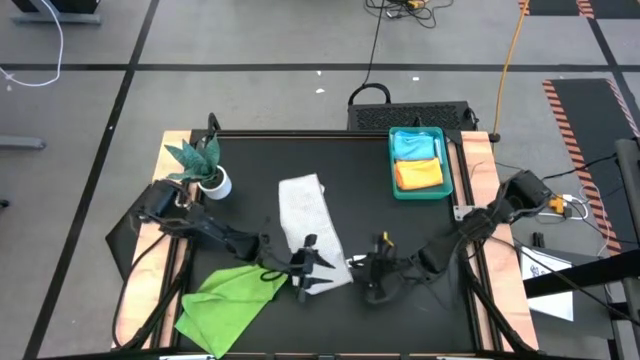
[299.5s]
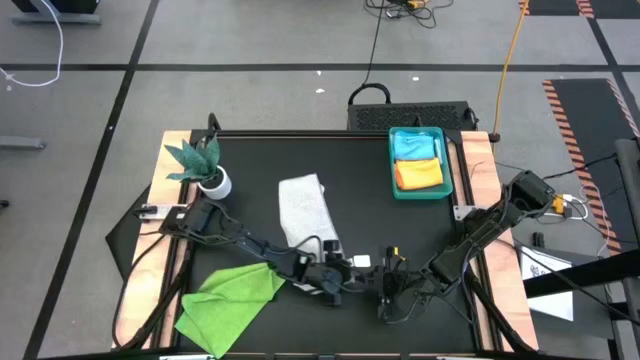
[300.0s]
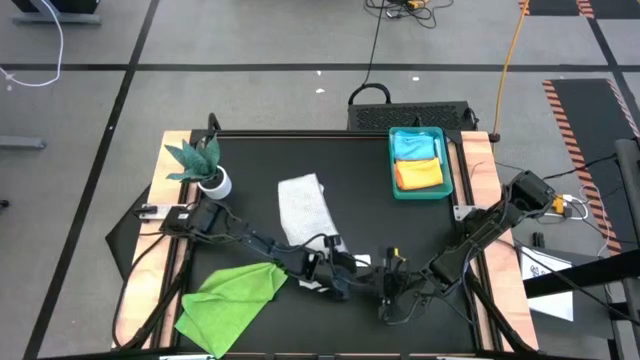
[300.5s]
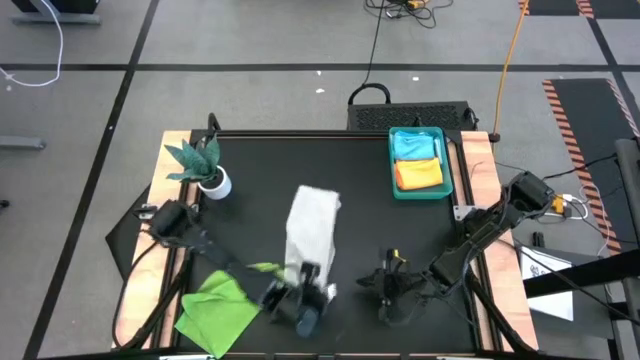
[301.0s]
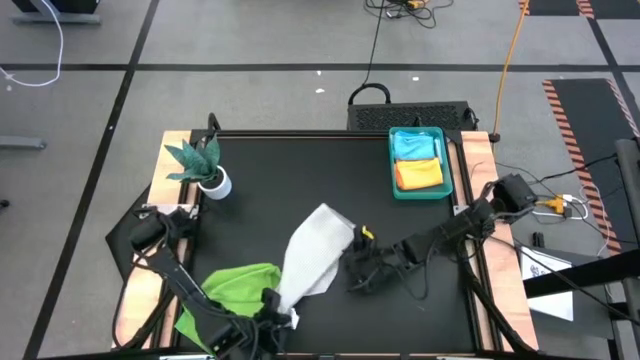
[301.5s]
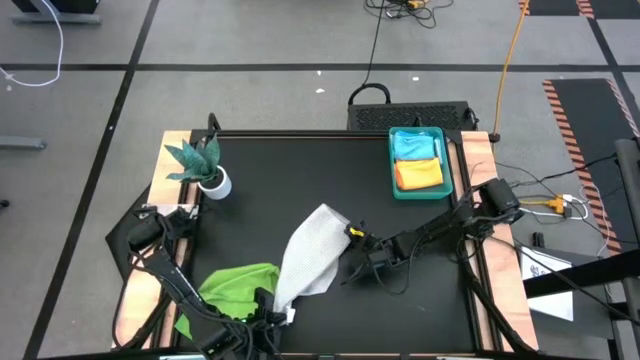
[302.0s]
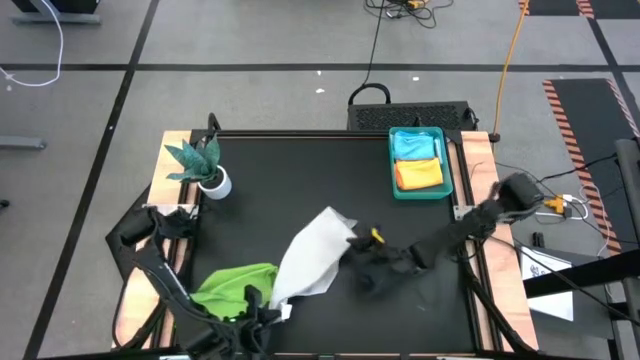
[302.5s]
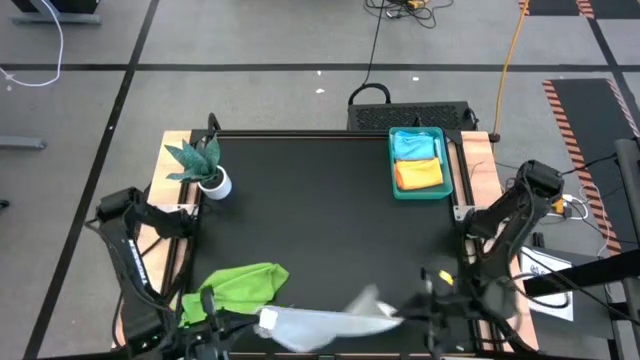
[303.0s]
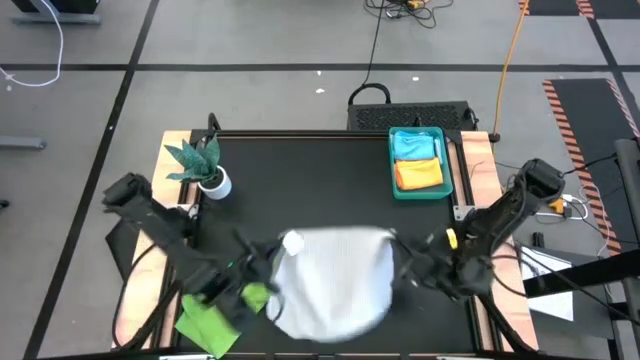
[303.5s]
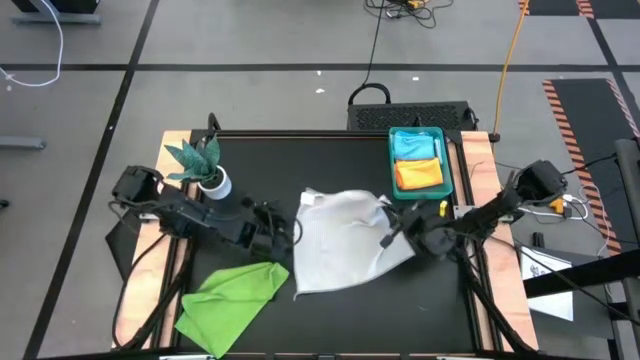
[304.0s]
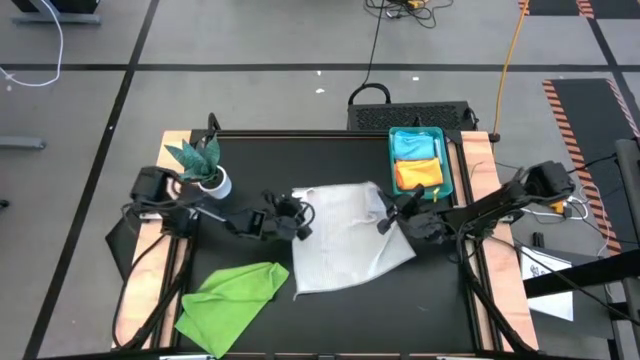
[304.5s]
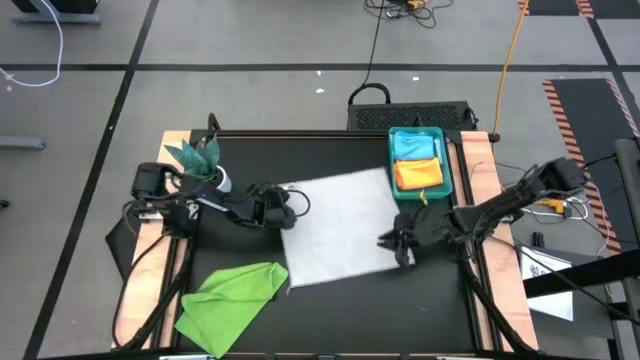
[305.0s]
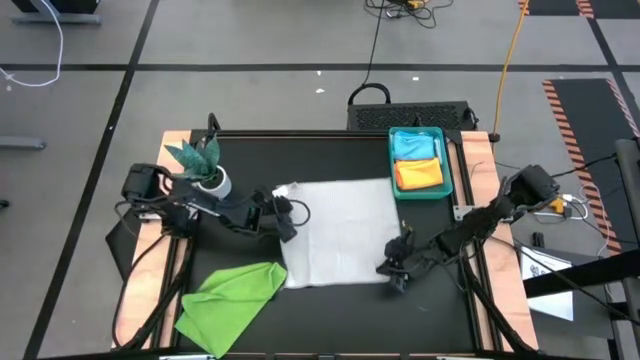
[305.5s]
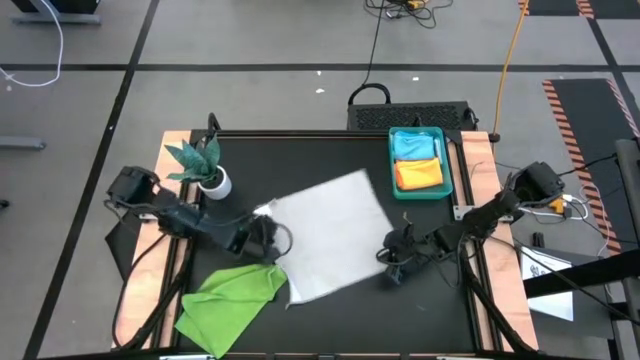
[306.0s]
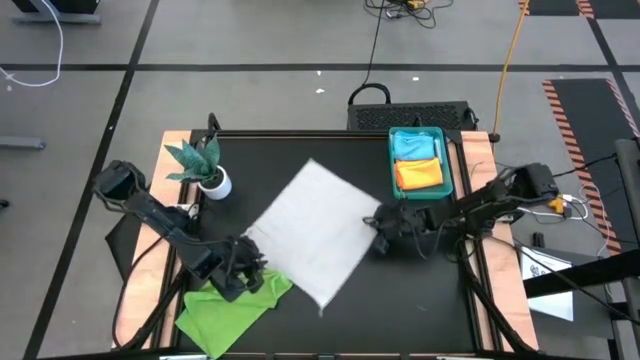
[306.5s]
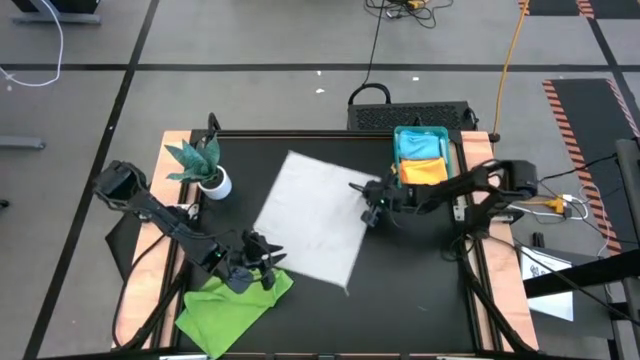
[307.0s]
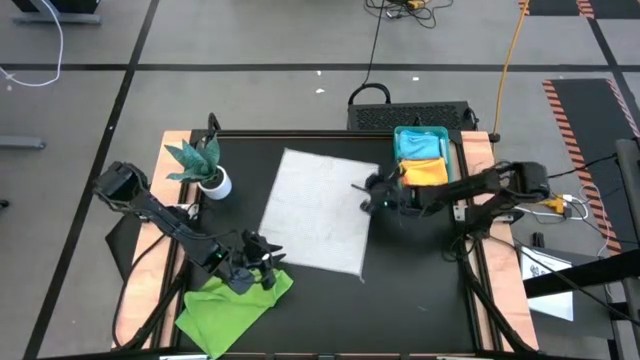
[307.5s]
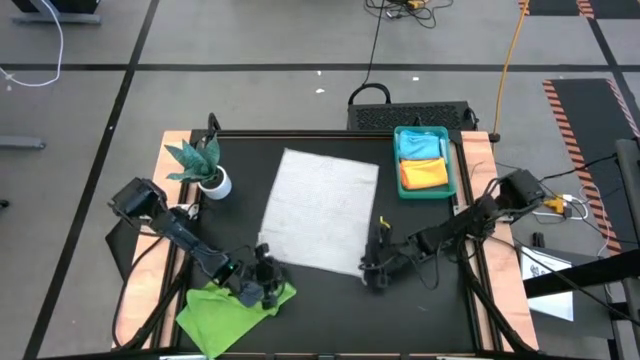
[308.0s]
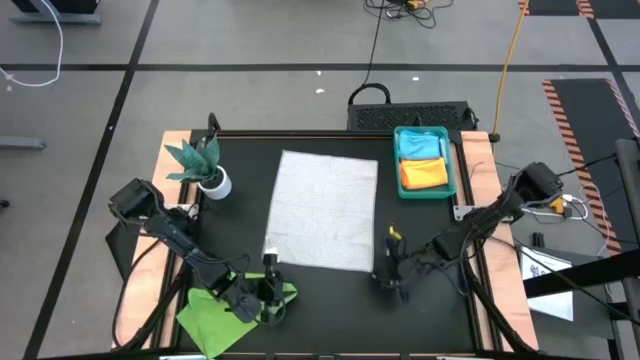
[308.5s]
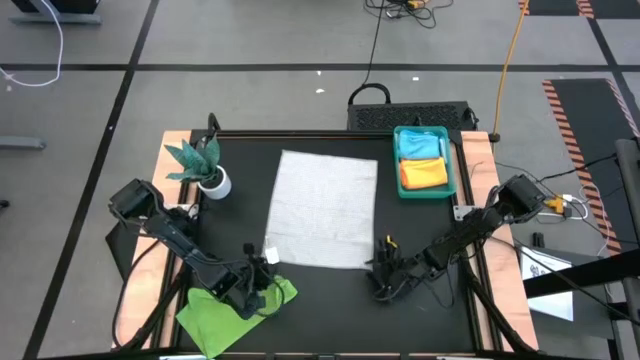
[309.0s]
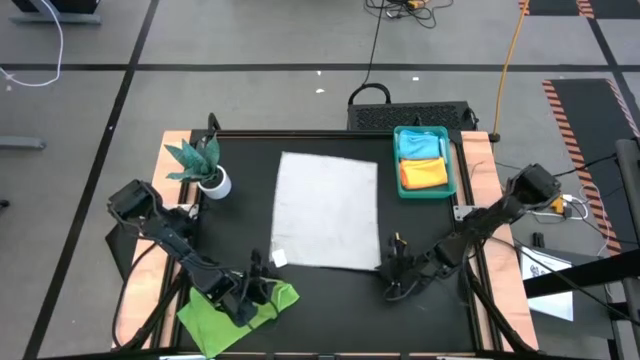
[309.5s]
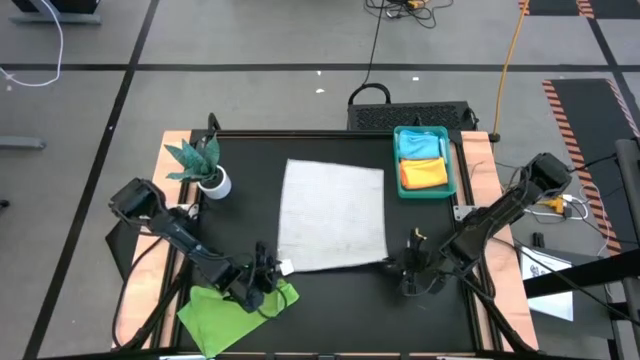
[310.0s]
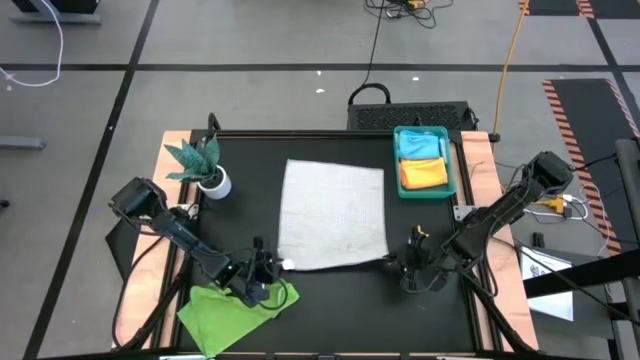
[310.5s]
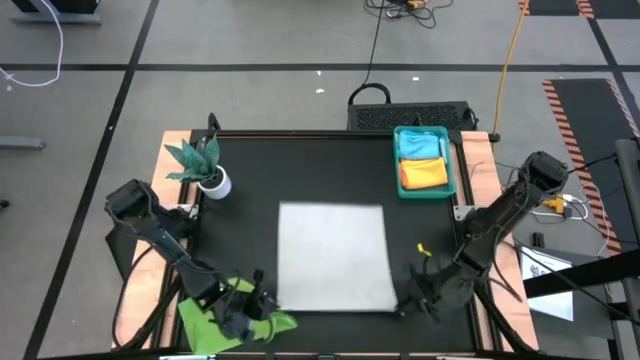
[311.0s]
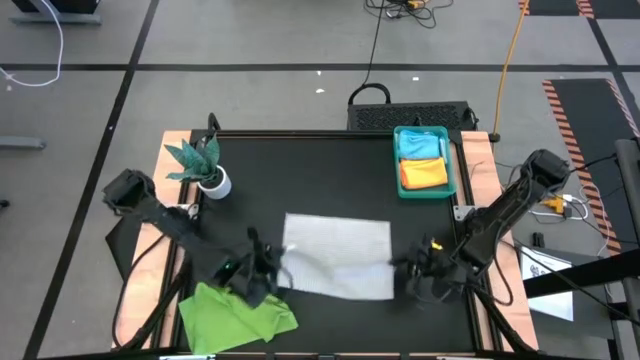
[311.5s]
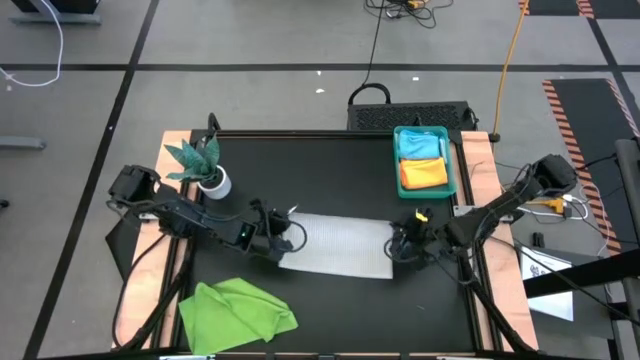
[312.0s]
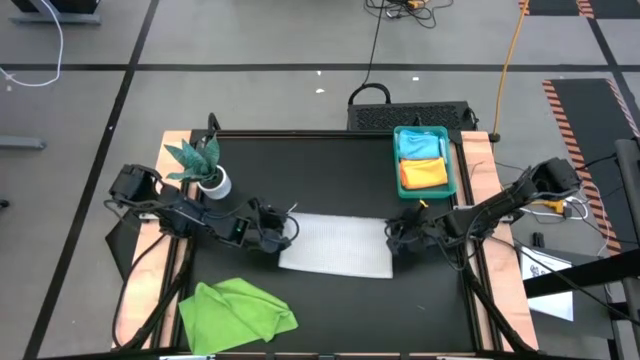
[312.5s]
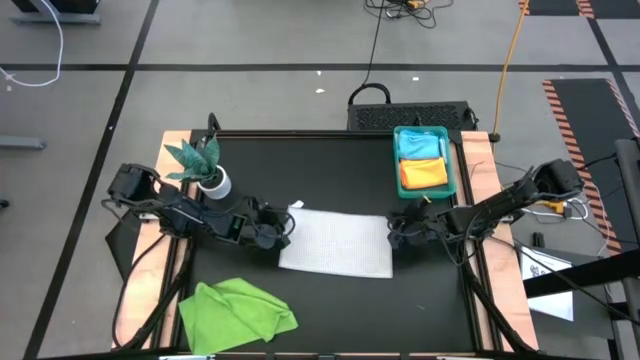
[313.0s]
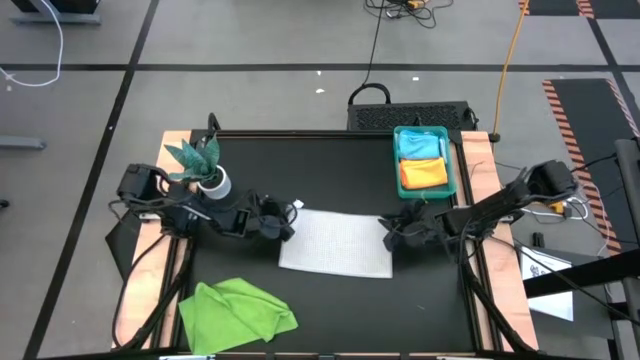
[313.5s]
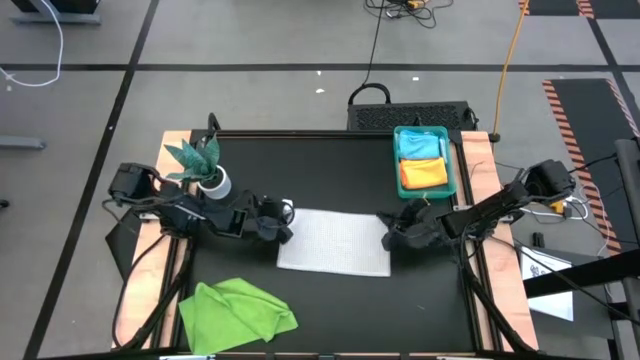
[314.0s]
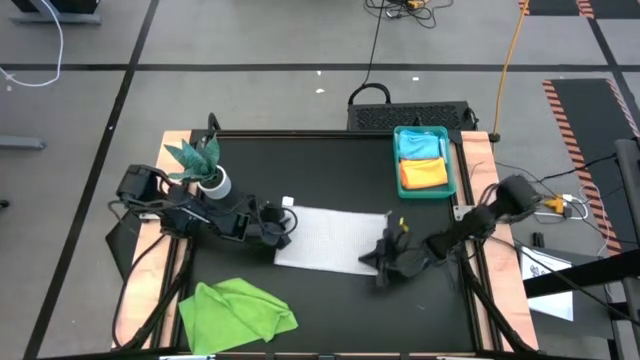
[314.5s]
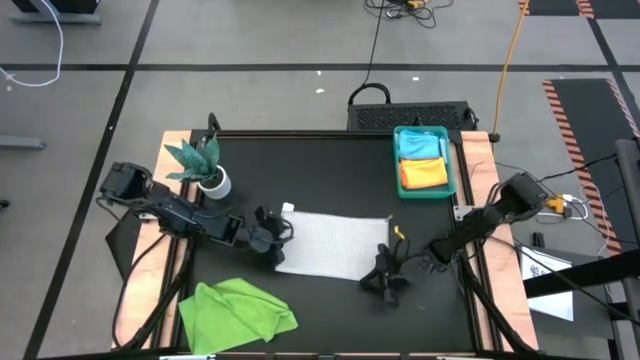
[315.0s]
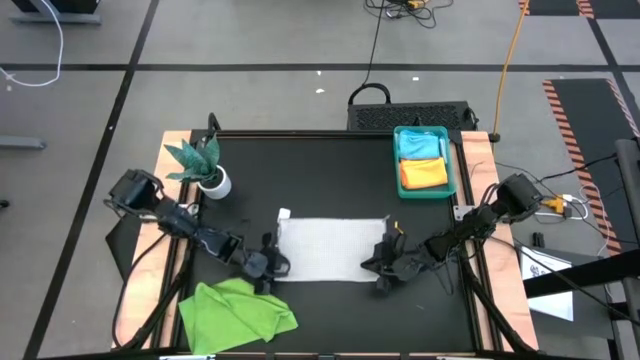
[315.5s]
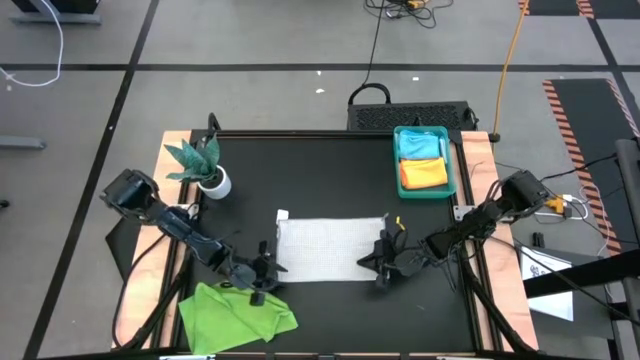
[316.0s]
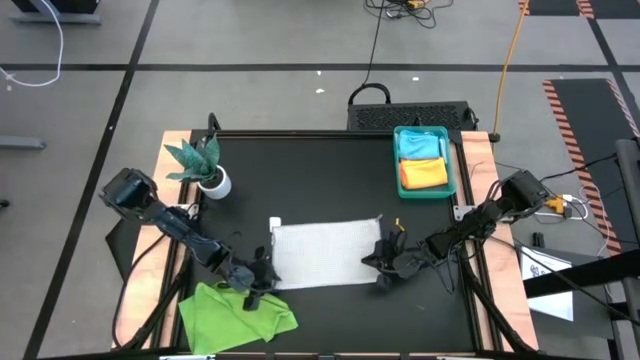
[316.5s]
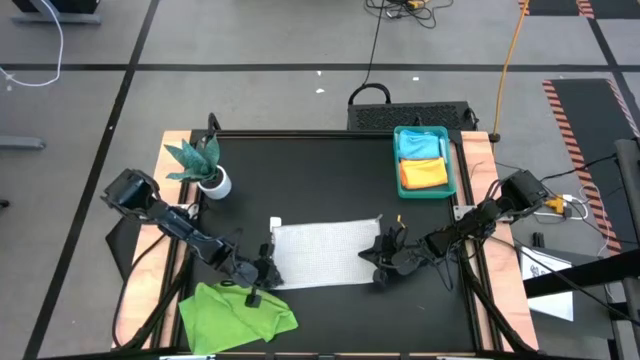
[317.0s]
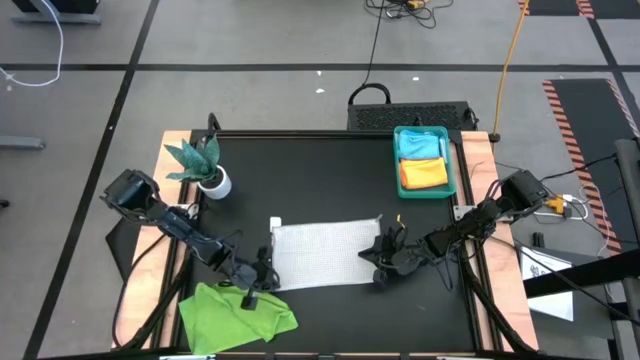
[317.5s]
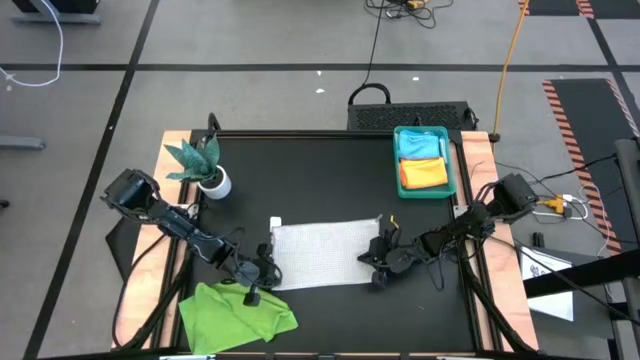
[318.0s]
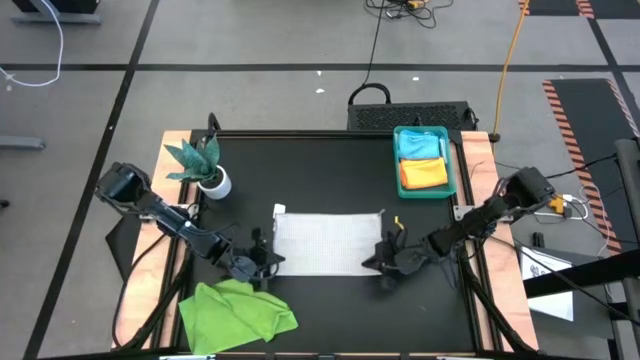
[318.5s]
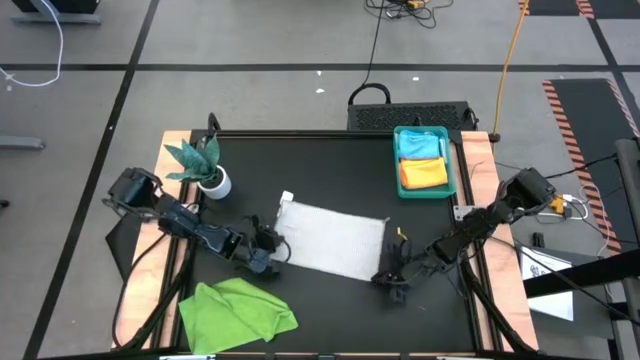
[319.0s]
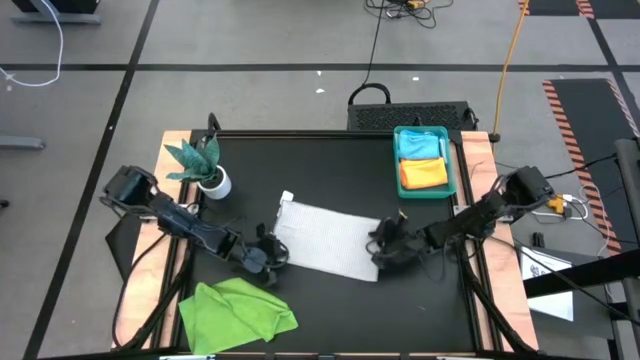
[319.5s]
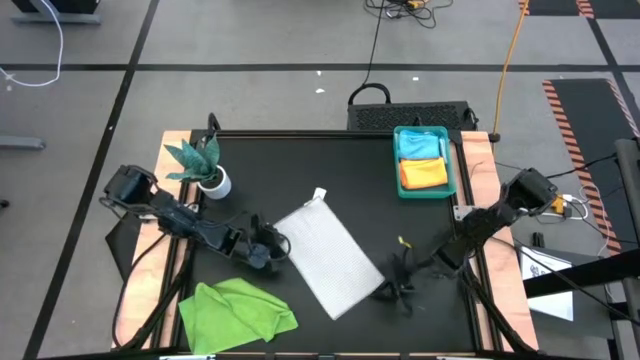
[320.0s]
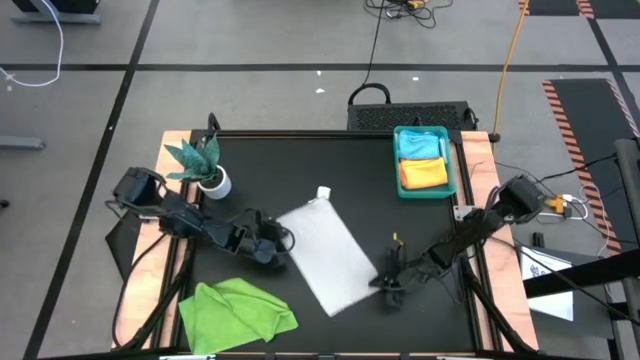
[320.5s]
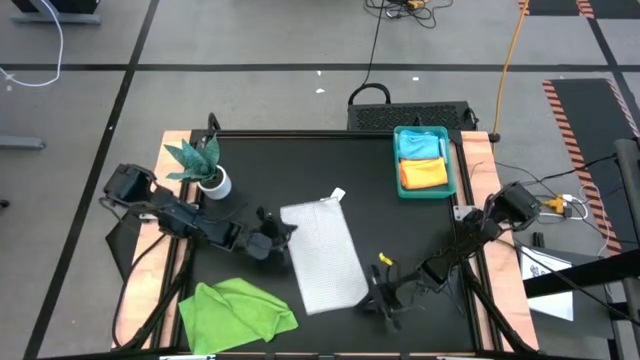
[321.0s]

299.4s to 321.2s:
Task: Fold microfiber towels
Fold the white microfiber cloth
